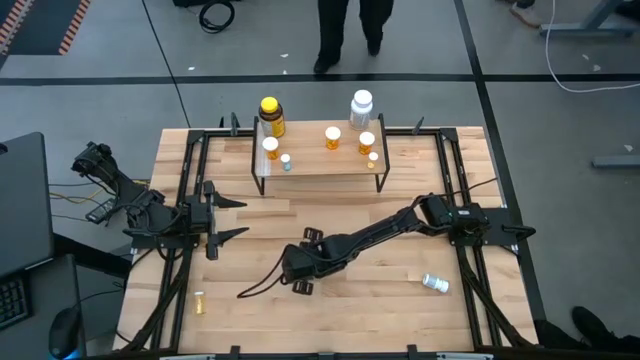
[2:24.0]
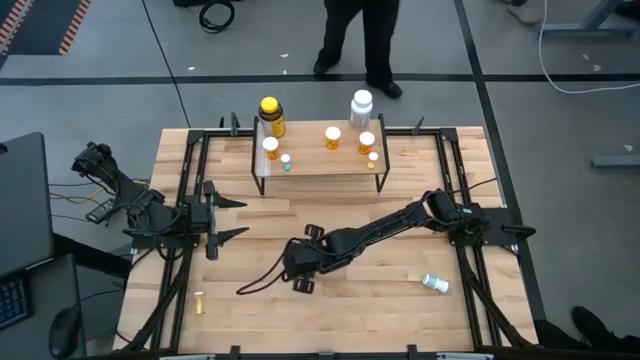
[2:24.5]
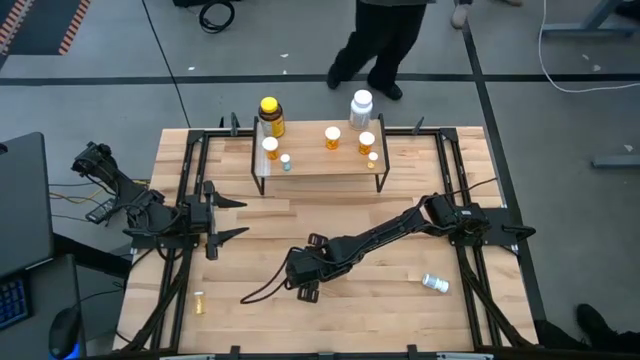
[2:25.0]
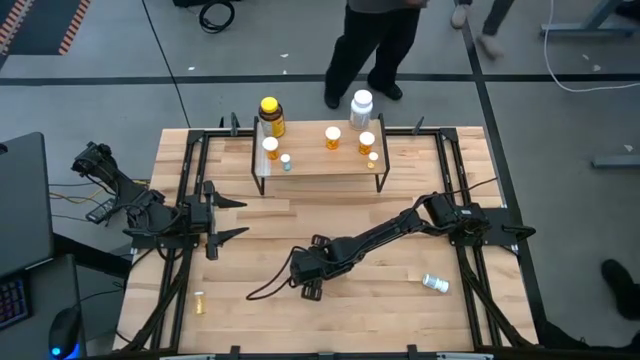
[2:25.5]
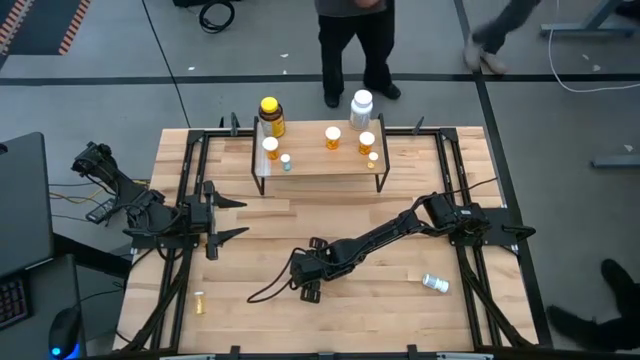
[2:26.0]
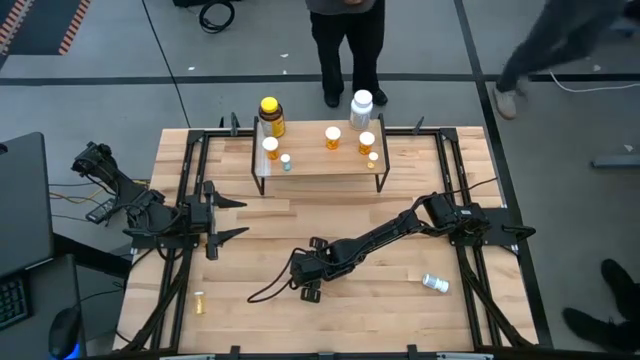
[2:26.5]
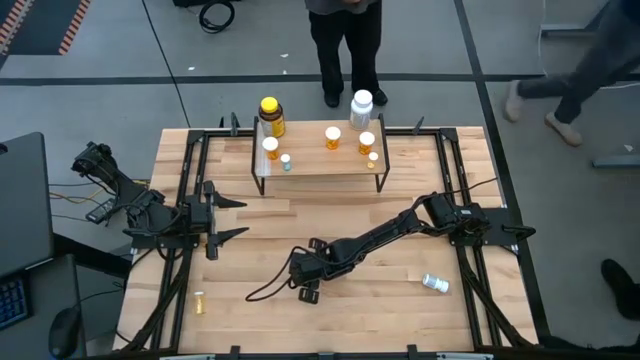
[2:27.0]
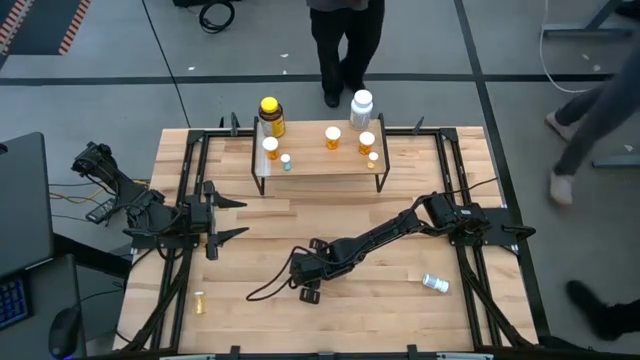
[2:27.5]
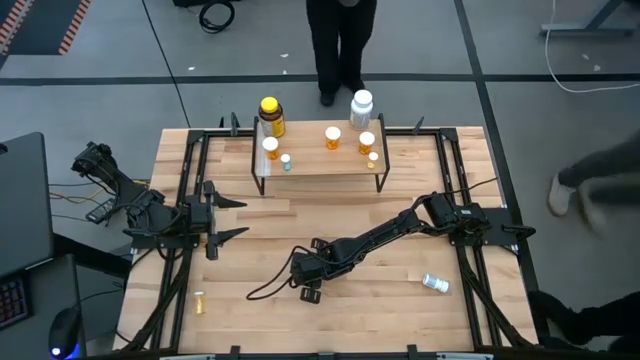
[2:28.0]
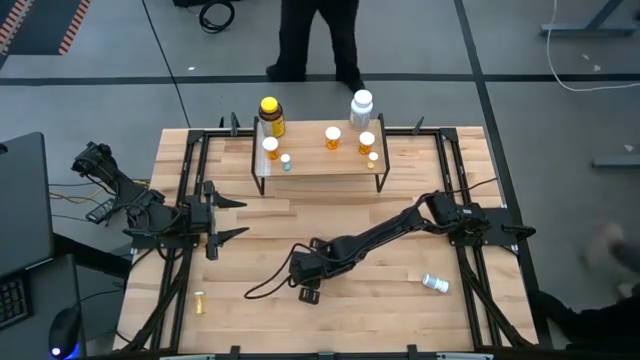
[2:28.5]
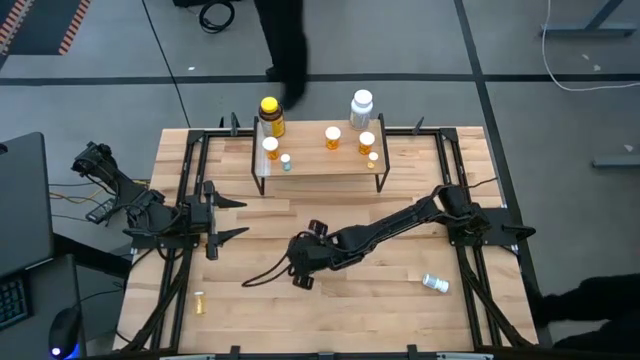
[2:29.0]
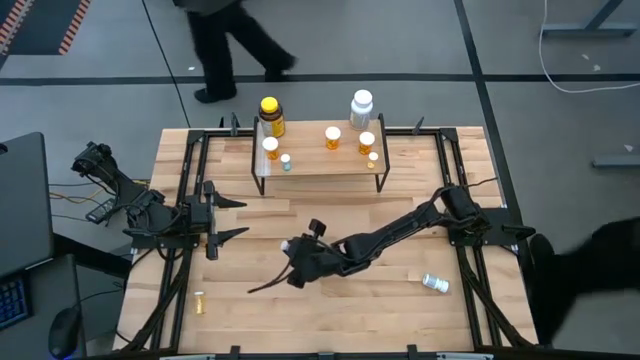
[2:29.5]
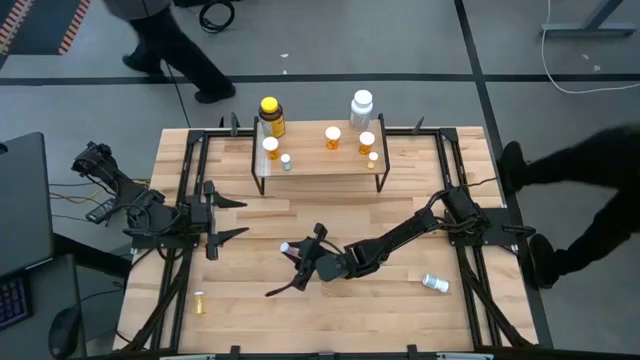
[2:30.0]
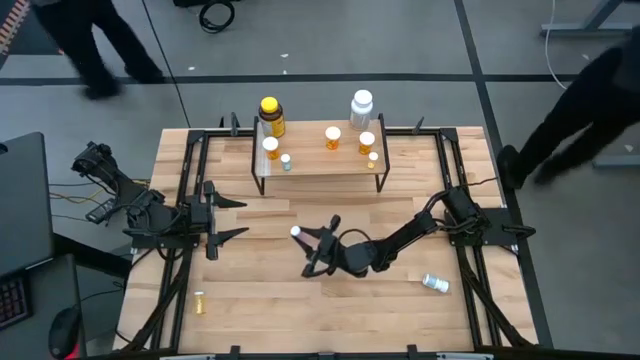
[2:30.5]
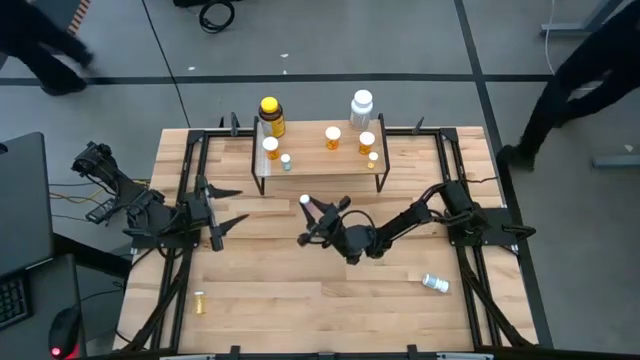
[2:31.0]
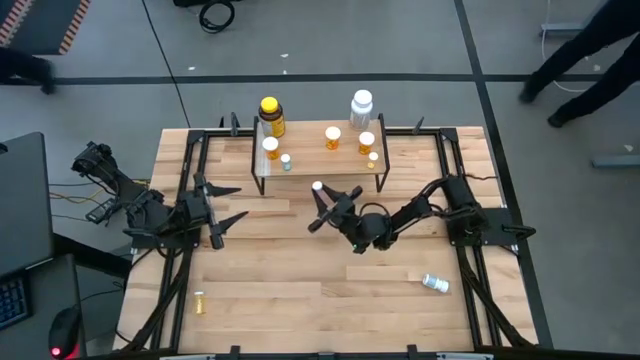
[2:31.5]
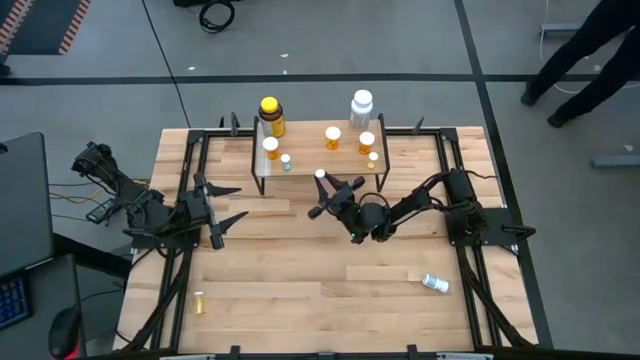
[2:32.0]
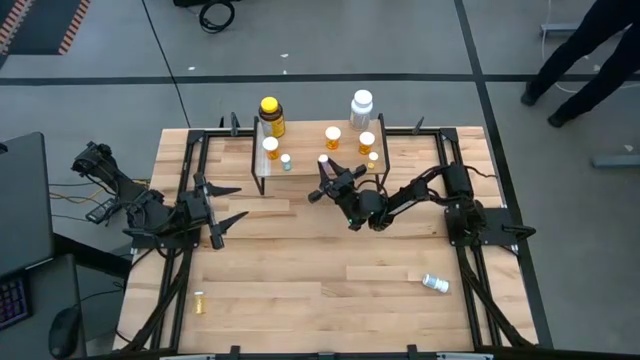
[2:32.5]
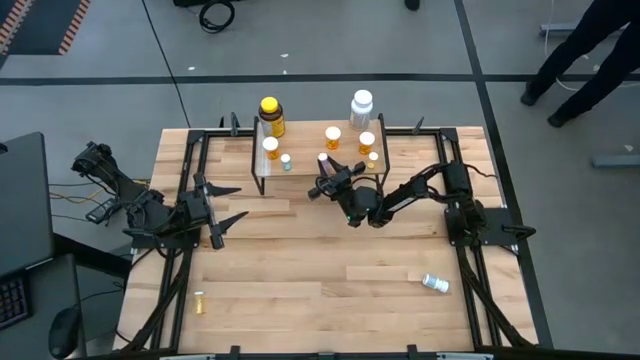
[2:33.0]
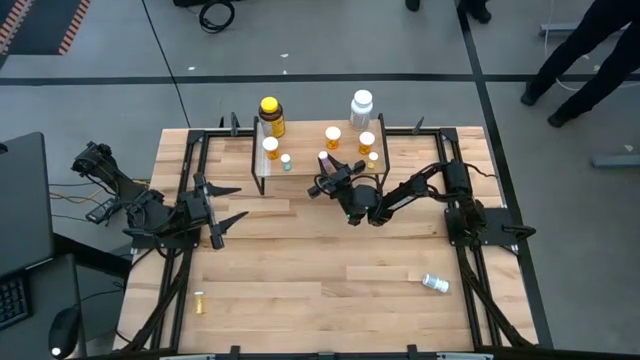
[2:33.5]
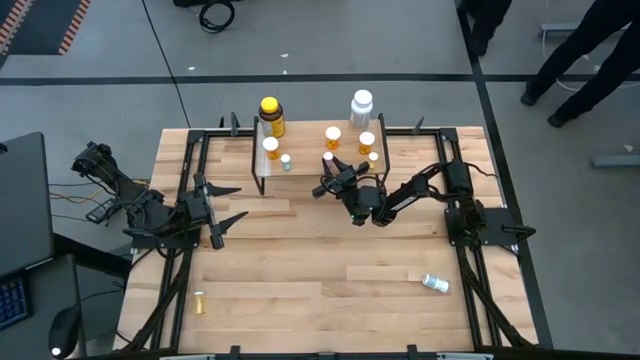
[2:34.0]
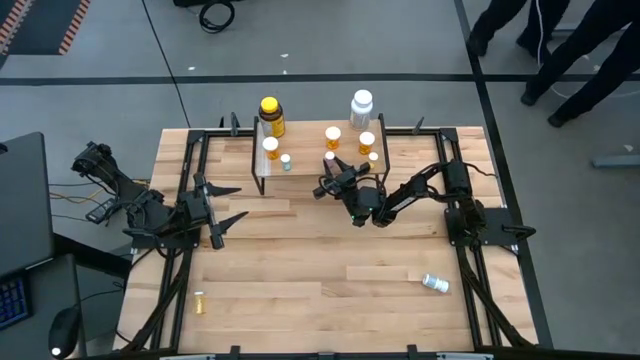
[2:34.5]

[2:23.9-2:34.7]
Task: Pick and place medicine bottles onto shelf by color
Put the pink pill bottle on the shelf

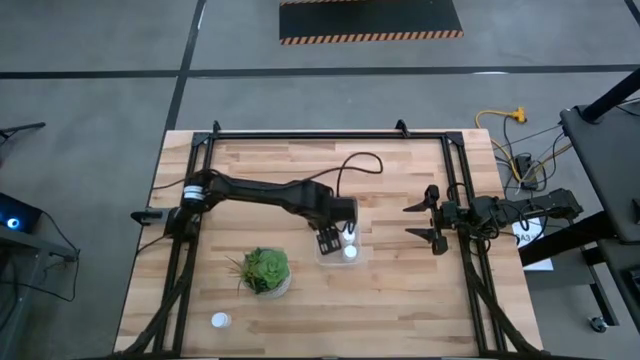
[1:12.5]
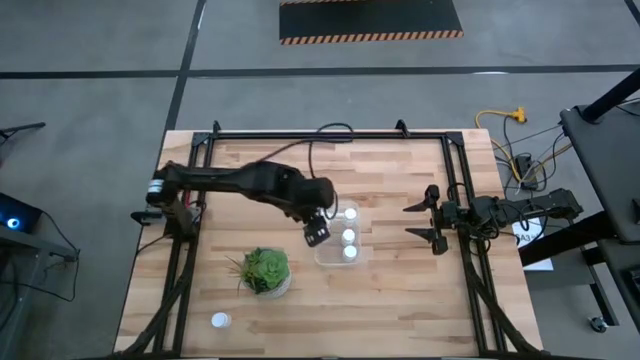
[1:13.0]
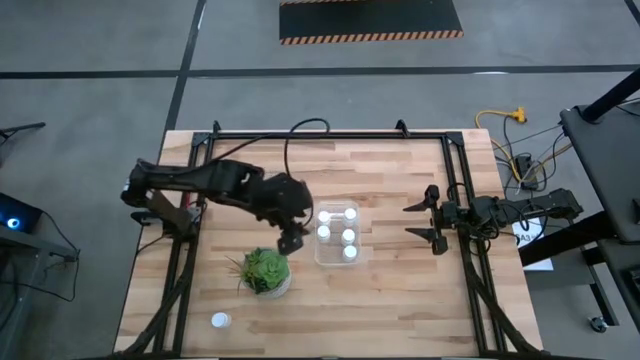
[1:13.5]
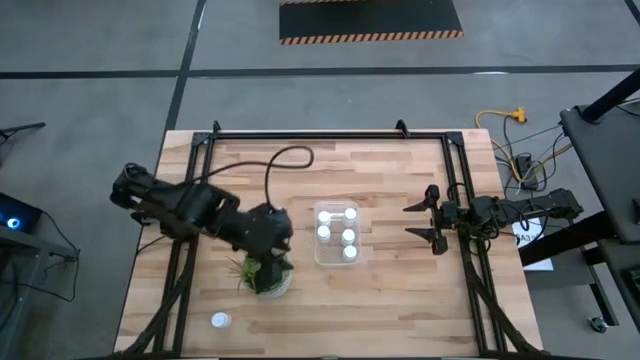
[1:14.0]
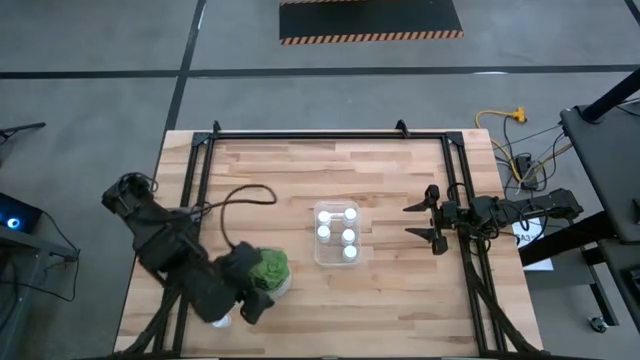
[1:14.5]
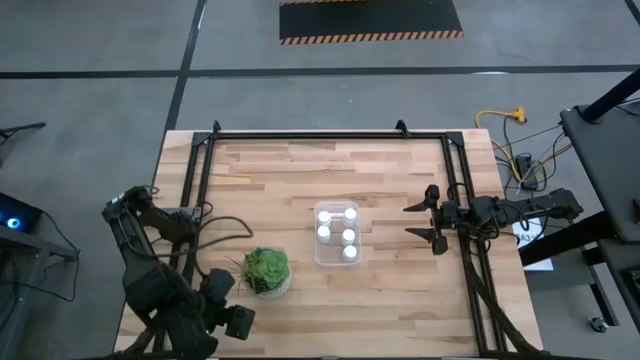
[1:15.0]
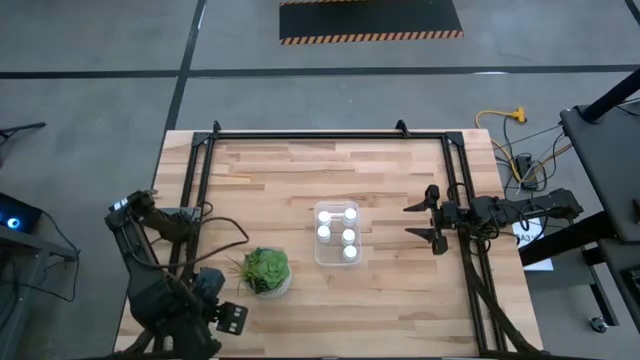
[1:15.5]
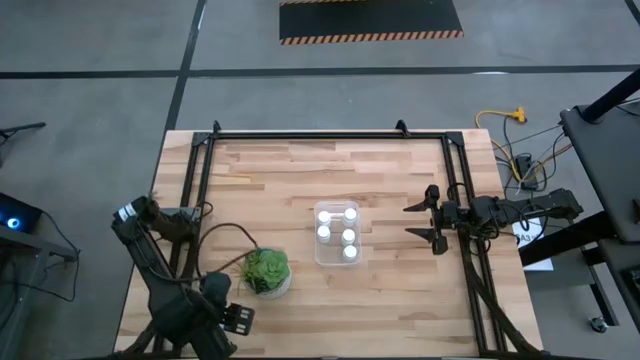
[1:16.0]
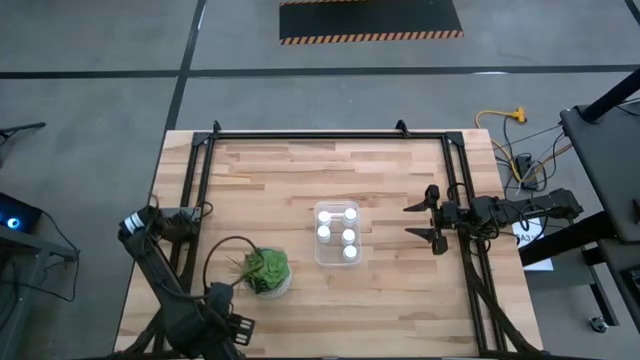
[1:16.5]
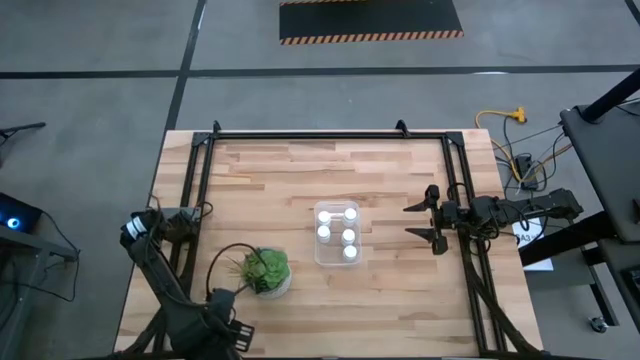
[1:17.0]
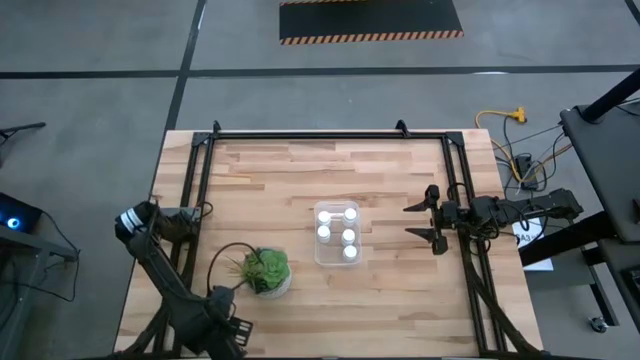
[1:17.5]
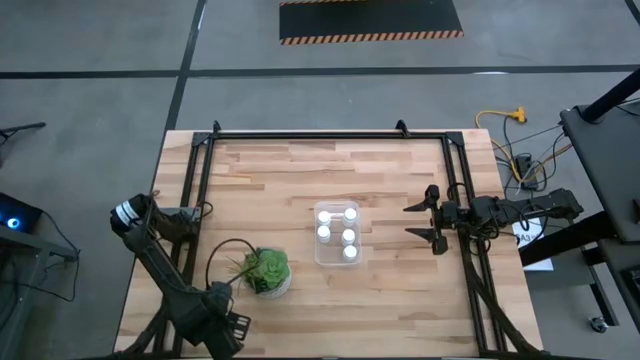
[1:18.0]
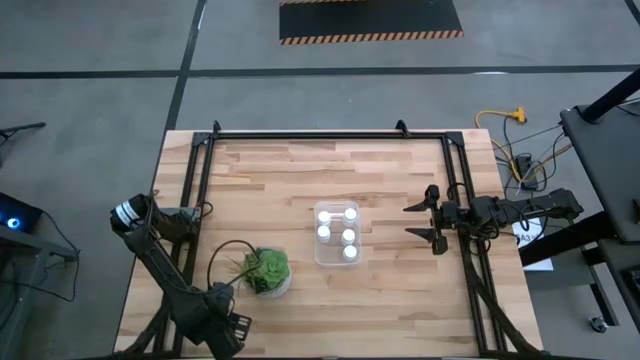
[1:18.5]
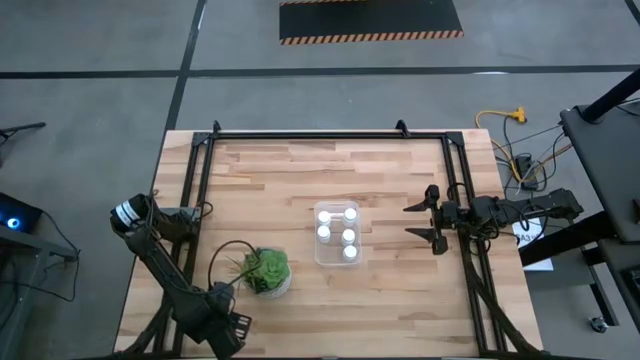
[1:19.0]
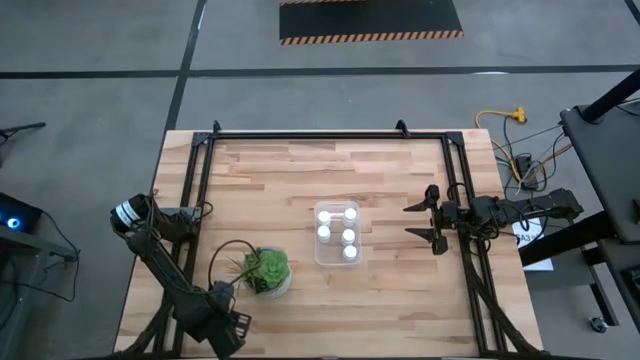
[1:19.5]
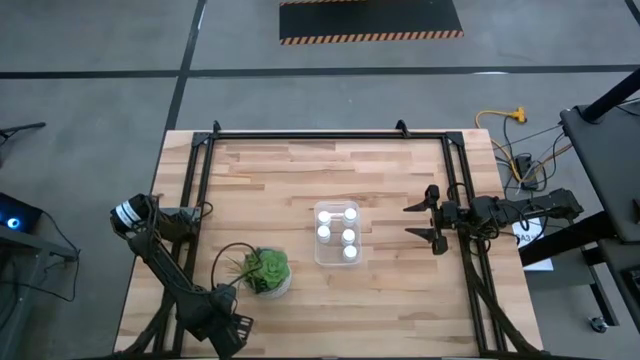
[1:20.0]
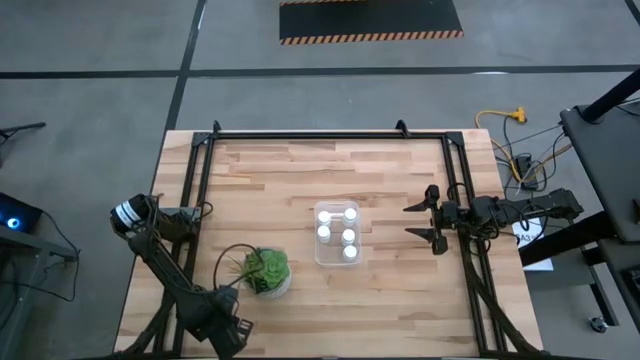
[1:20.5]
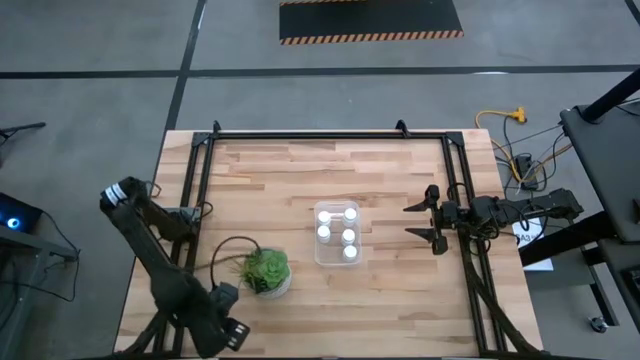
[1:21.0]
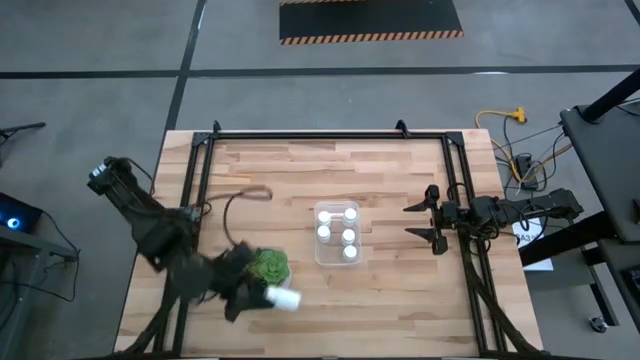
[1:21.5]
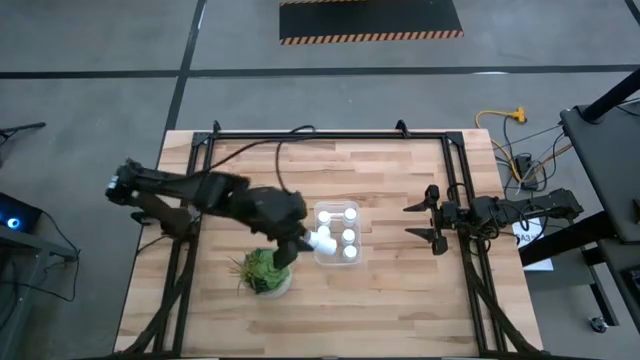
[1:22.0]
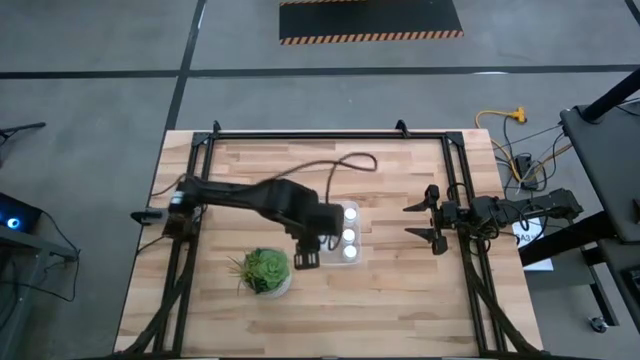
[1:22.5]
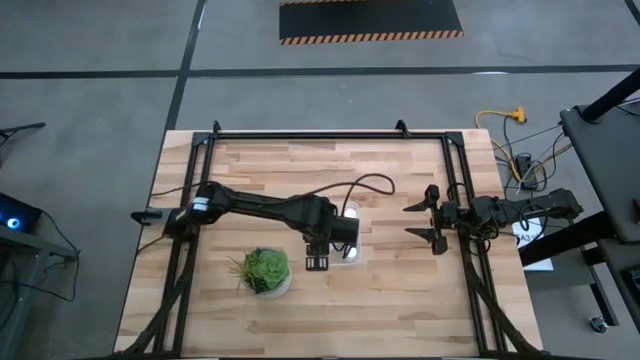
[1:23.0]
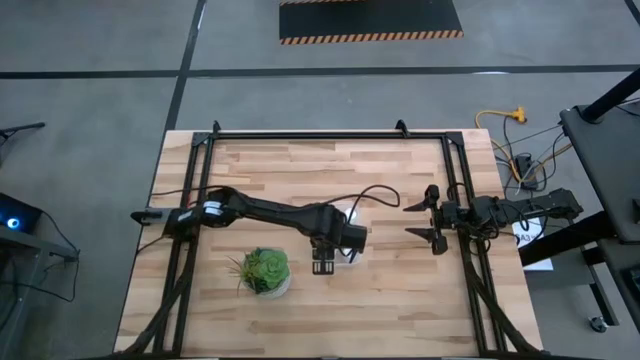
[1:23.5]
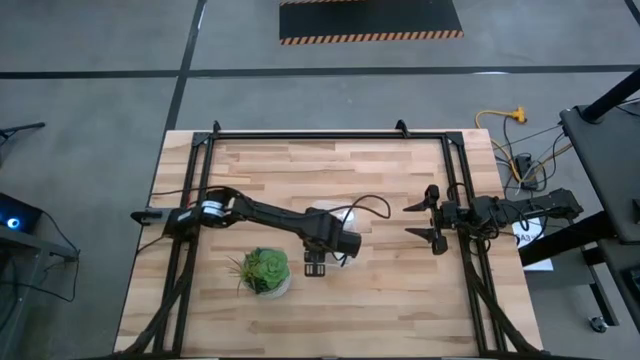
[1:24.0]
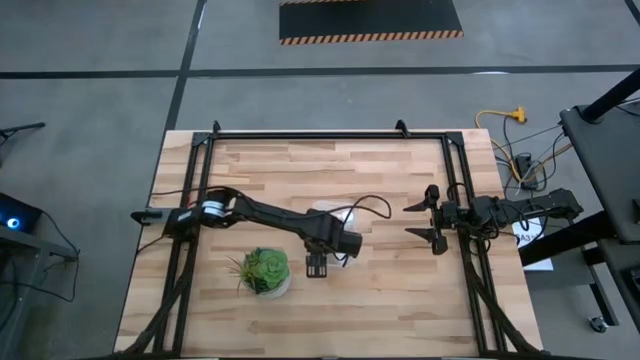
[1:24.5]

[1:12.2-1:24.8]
Task: Pick and place pill bottles into a basket
Put the white medicine bottle into the transparent bin
